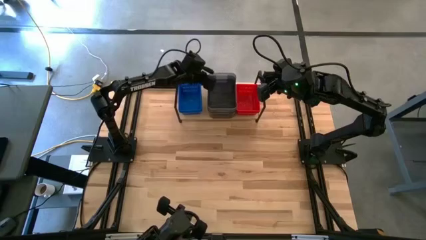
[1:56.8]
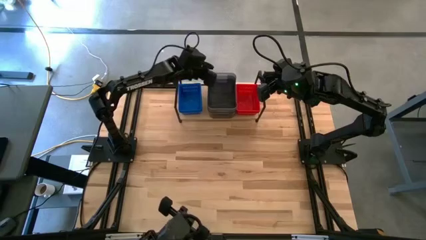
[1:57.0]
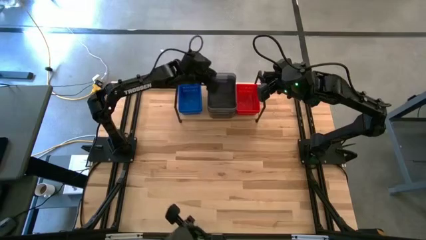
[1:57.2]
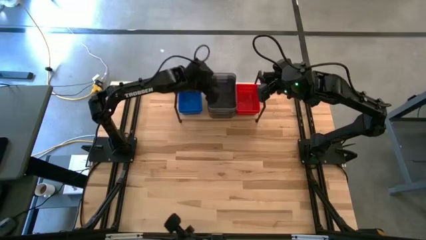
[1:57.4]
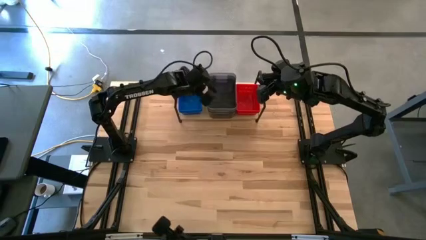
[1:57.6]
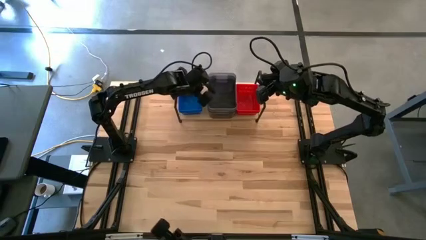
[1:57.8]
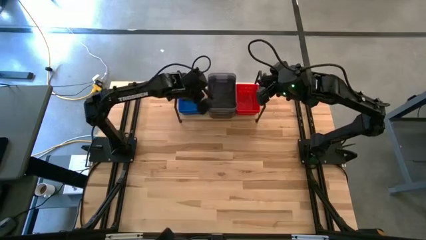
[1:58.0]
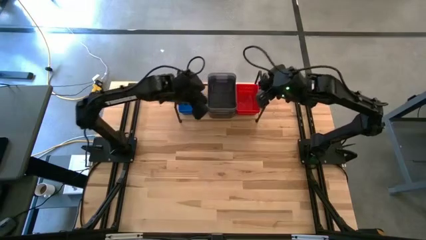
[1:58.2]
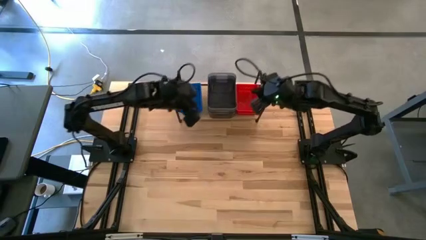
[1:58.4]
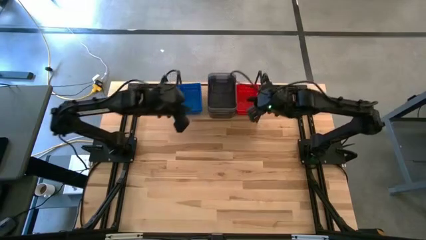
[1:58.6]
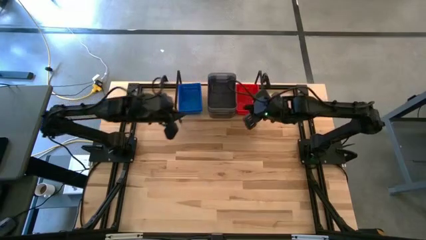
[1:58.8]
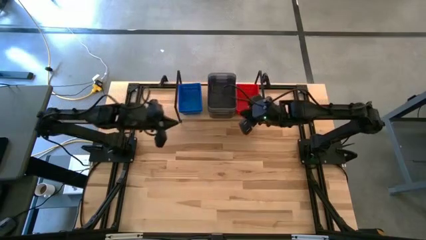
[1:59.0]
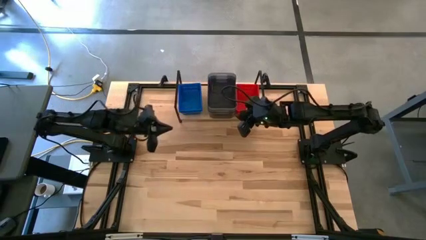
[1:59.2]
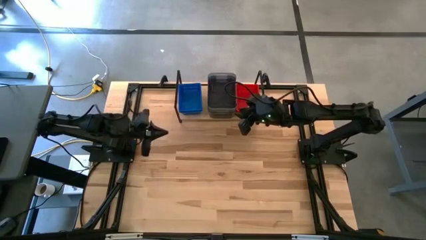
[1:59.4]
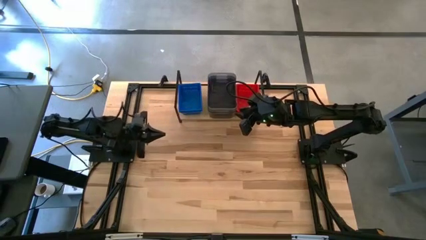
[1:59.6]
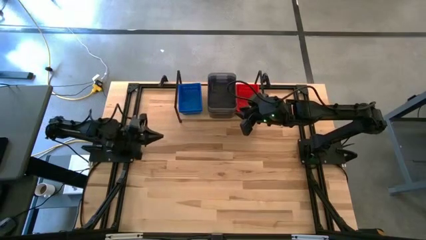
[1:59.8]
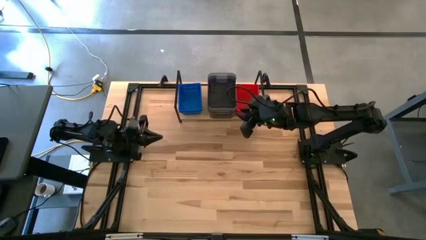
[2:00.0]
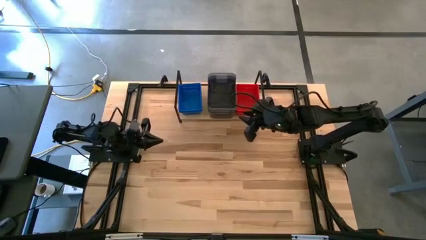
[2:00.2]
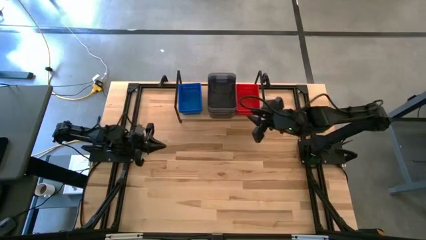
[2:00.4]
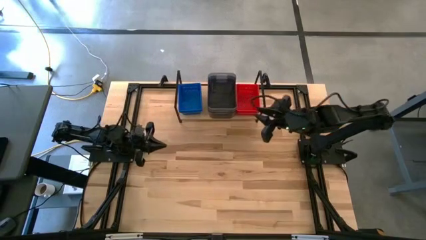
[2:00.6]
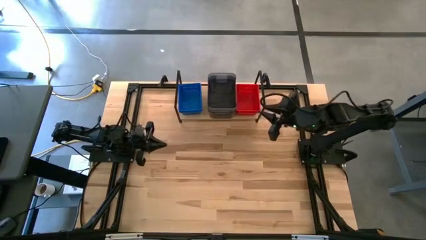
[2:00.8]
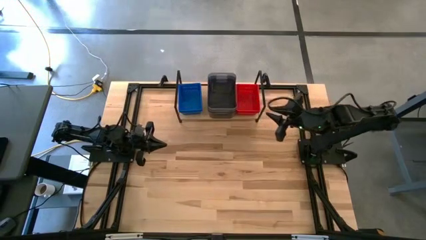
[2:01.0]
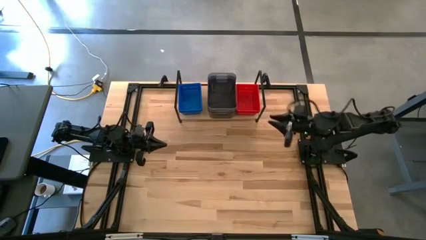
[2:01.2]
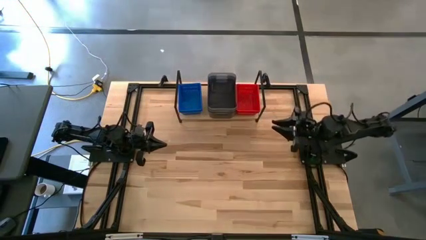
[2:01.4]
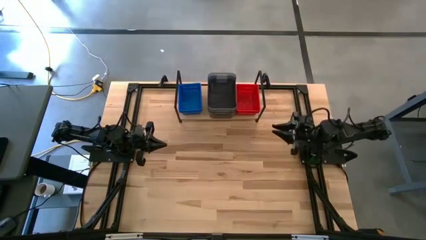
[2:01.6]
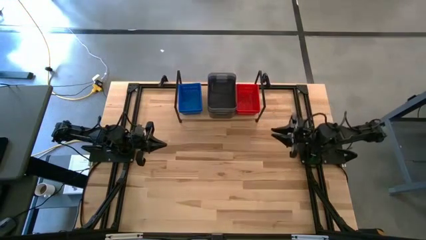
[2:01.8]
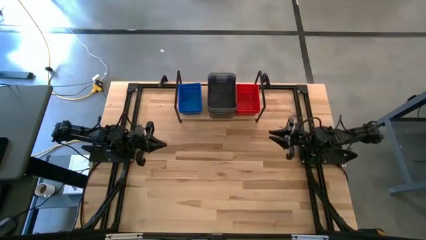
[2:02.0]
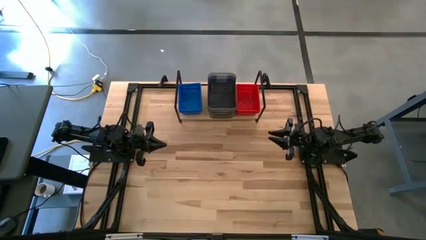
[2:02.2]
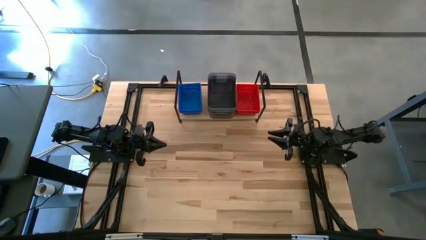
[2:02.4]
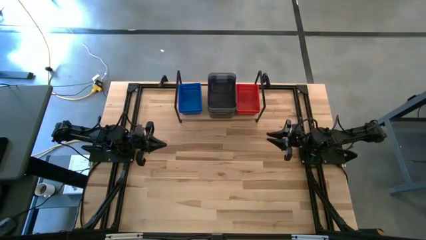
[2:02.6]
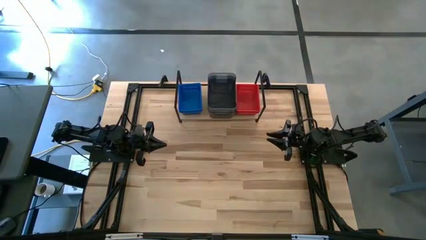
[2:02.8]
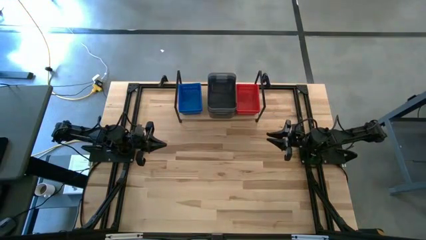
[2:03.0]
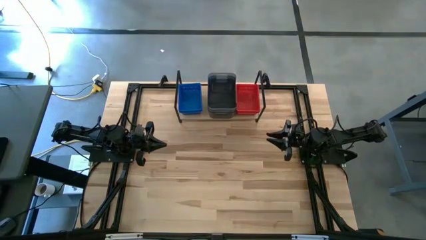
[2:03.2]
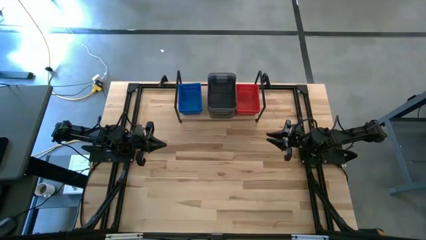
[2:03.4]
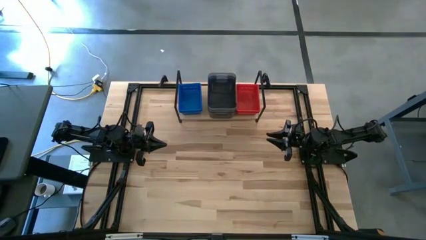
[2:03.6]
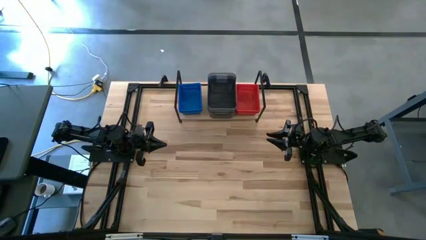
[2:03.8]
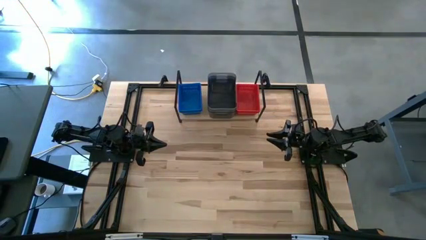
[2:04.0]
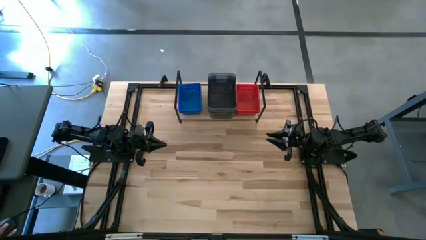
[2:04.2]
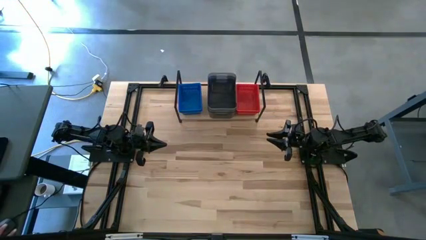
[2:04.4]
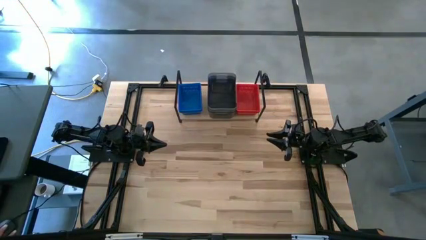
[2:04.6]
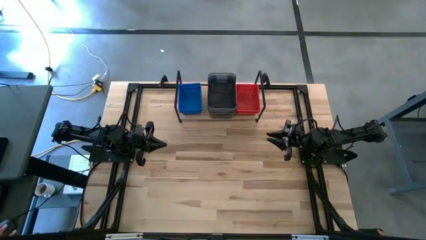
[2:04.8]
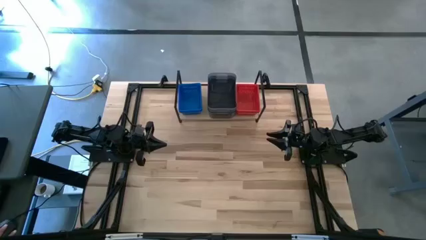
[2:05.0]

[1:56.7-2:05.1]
Task: Stack baskets on shelf by color
Return to Home Position

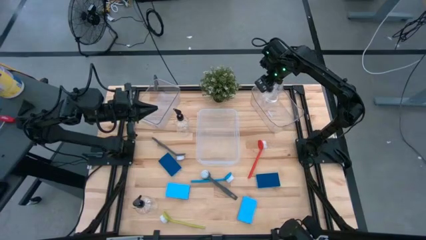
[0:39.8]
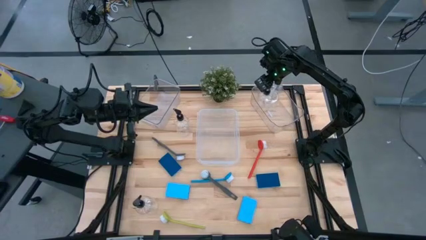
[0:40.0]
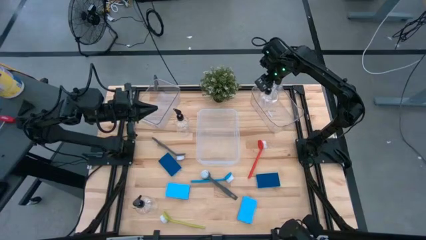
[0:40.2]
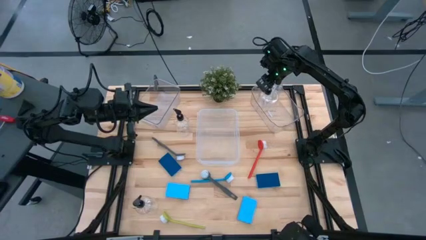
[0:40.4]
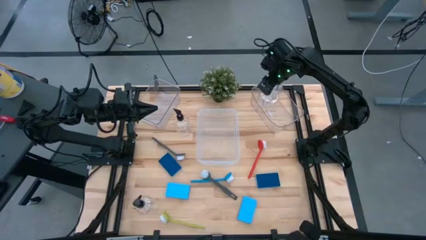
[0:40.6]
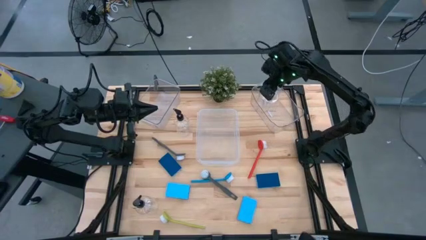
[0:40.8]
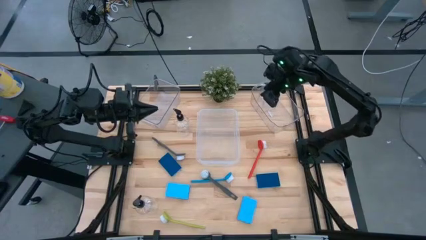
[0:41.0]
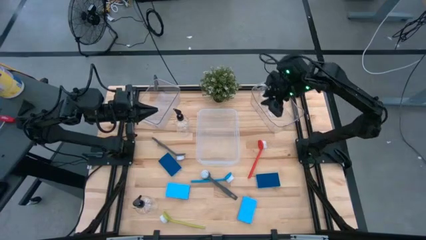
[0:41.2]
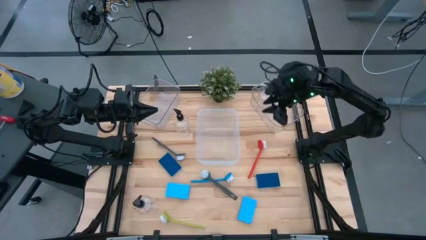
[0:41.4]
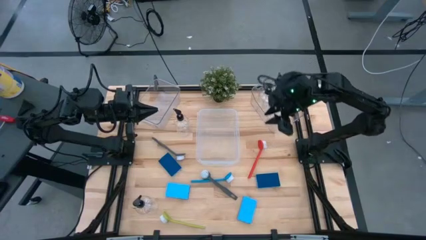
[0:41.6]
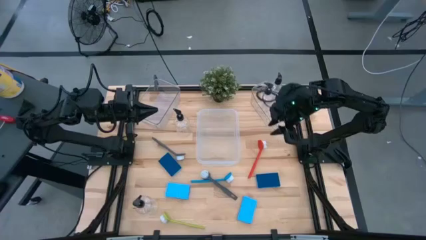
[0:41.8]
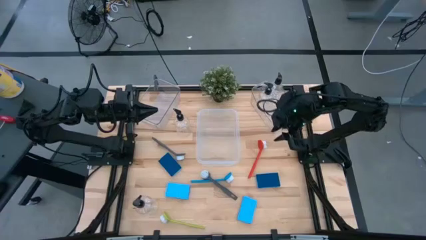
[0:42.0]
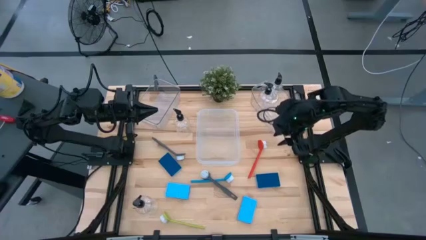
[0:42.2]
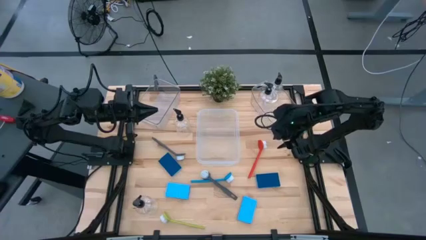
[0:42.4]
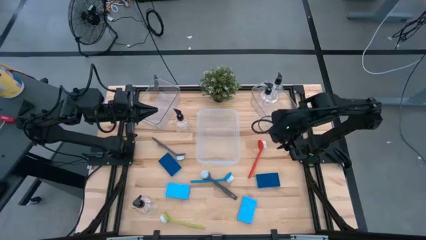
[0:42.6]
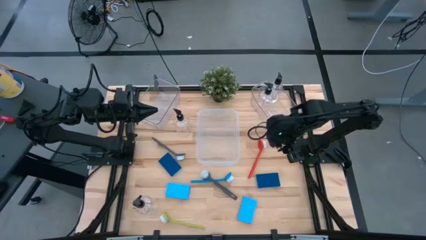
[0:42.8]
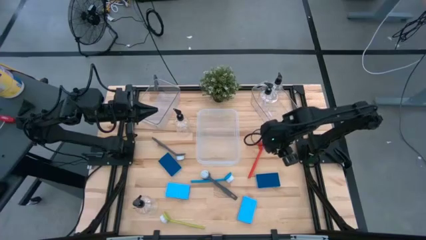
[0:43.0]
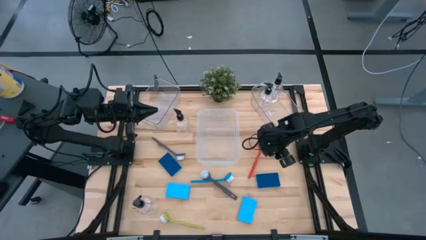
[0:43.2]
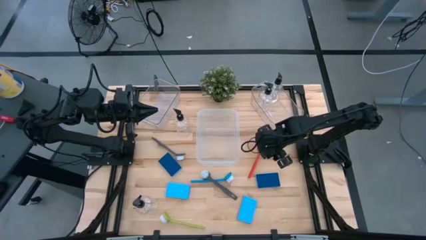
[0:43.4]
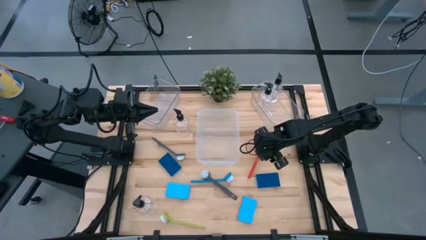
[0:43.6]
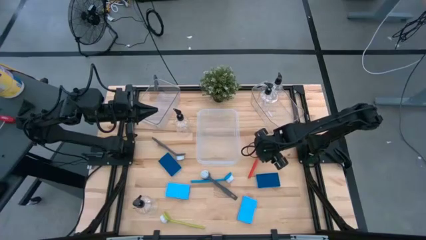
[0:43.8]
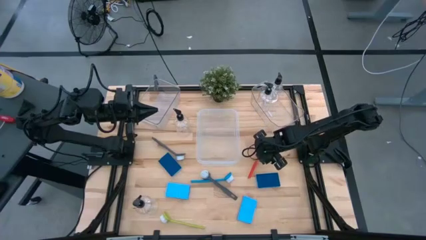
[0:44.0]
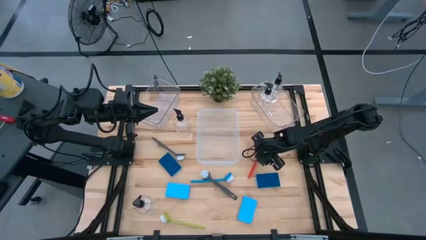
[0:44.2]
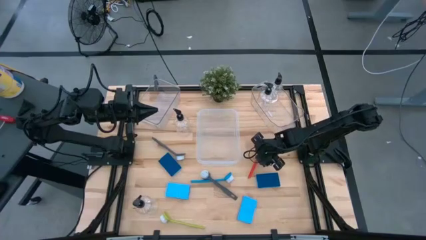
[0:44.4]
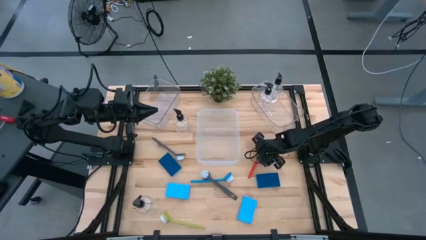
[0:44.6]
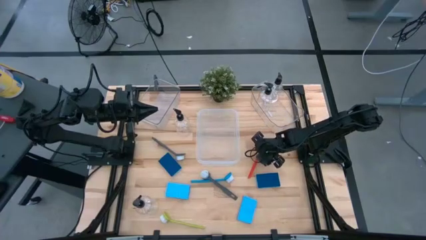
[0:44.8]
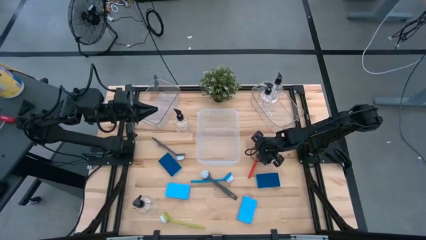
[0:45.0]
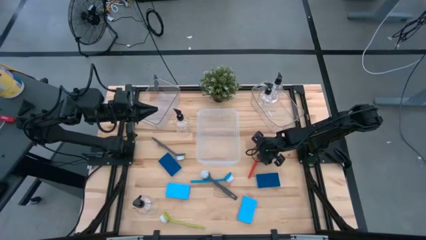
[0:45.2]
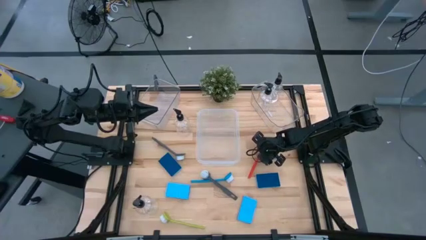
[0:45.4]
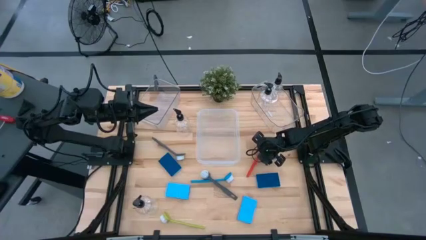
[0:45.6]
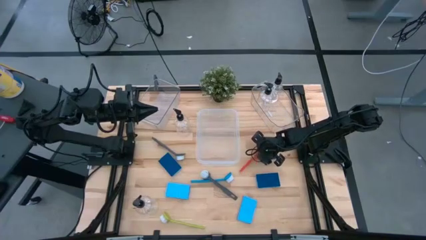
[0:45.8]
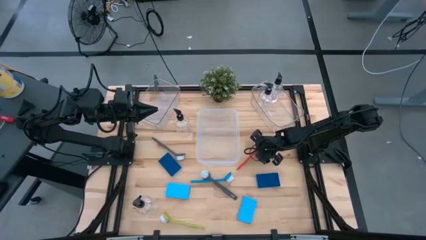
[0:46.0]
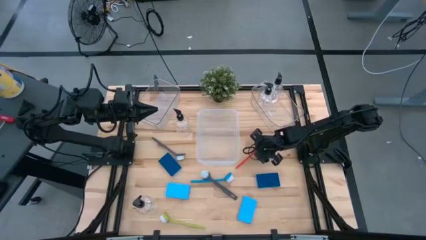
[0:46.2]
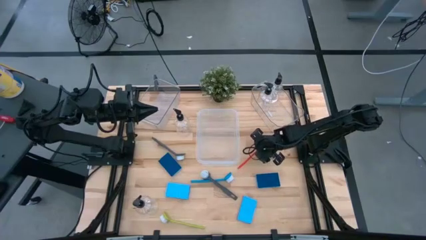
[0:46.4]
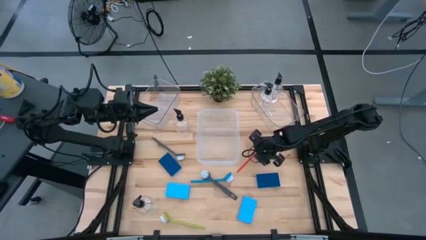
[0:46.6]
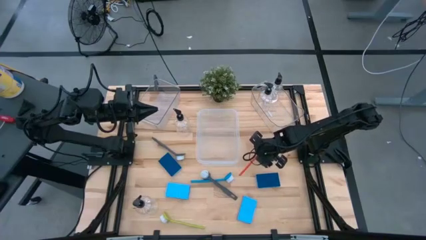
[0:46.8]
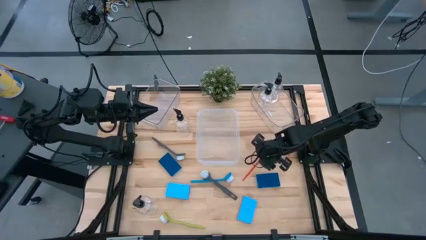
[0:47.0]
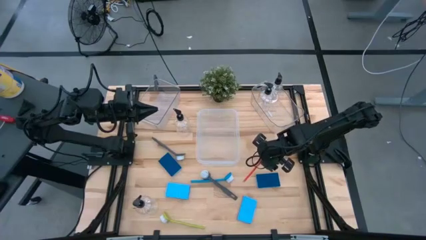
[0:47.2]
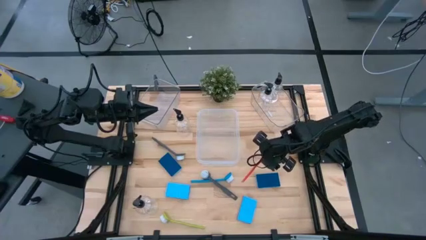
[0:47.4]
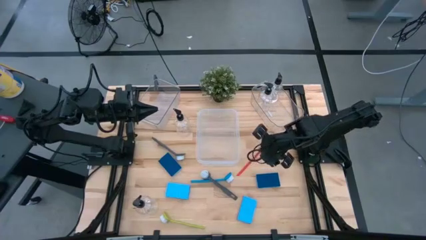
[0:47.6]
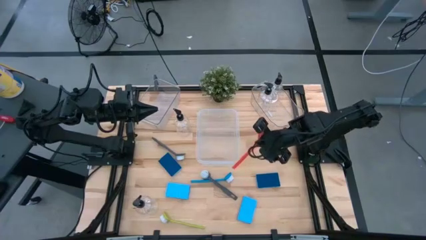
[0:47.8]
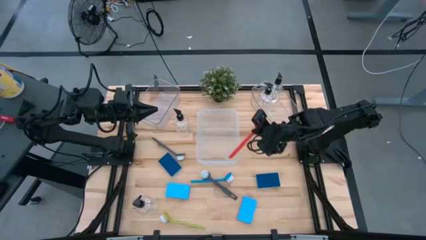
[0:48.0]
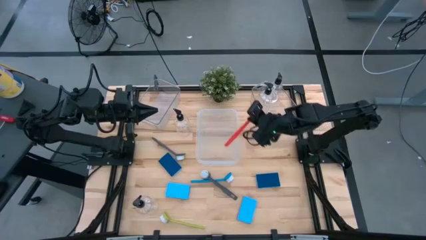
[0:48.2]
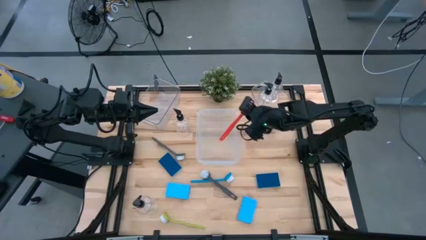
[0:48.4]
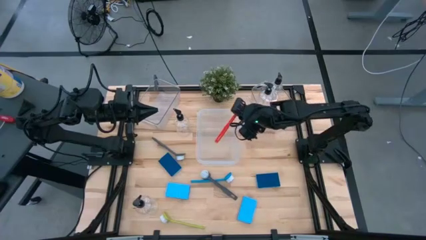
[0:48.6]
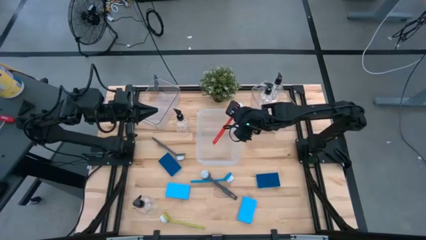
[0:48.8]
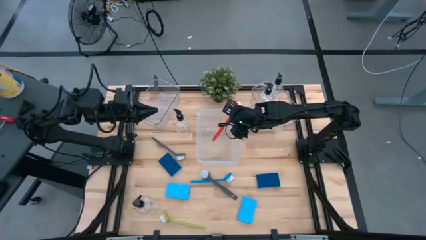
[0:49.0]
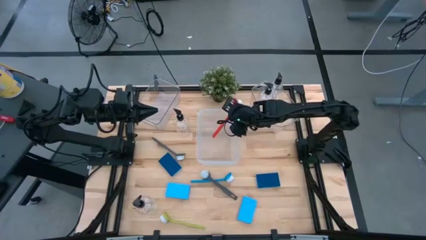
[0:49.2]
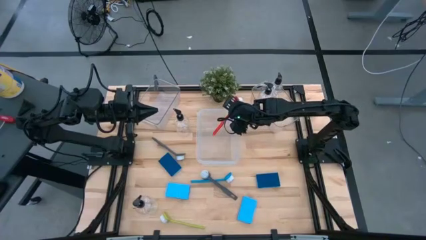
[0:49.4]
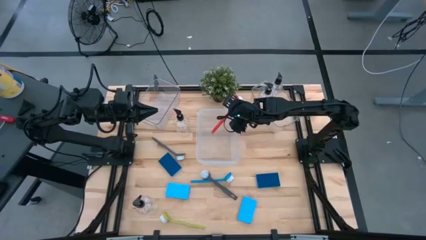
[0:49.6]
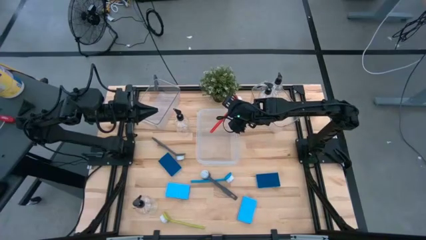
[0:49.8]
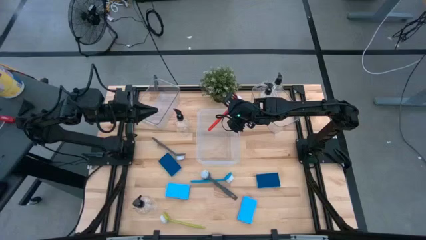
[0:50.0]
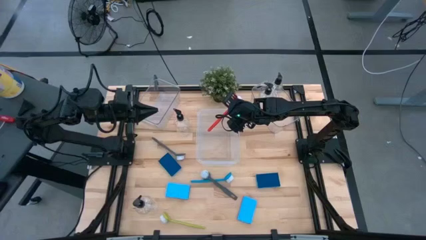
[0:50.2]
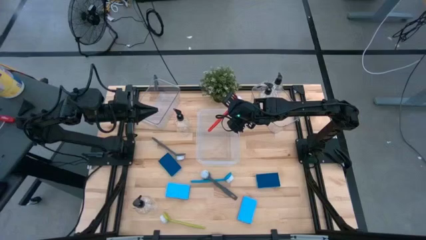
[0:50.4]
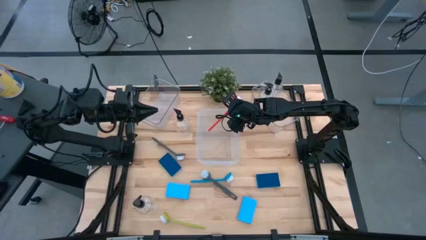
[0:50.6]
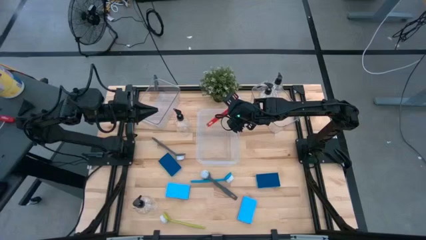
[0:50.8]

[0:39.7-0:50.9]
Task: Pick & Place Kitchen Sink Supplies
Put the orange dish brush into the transparent container
